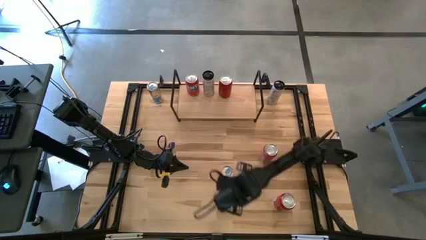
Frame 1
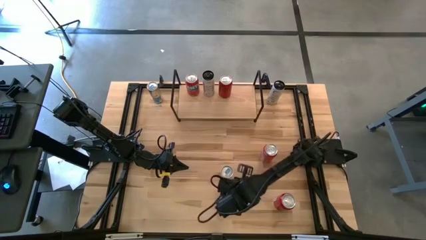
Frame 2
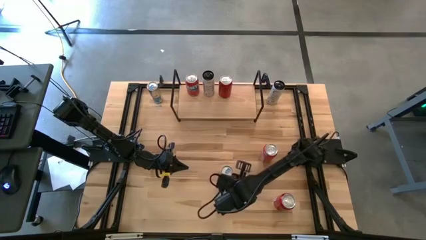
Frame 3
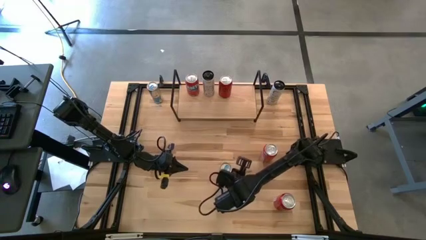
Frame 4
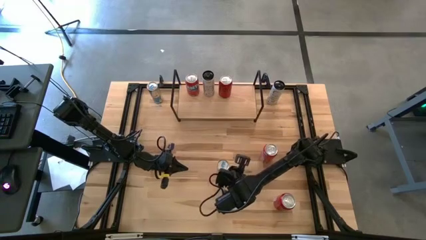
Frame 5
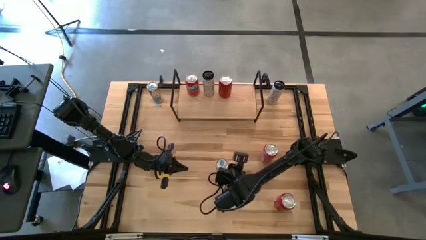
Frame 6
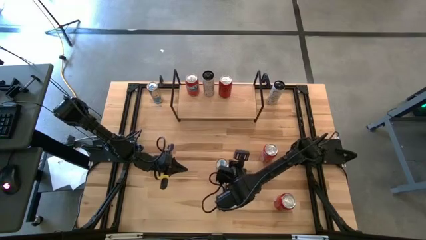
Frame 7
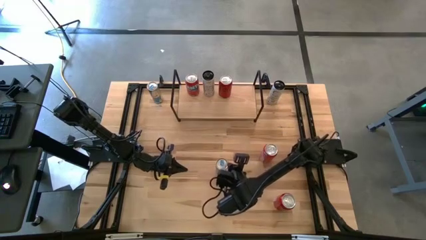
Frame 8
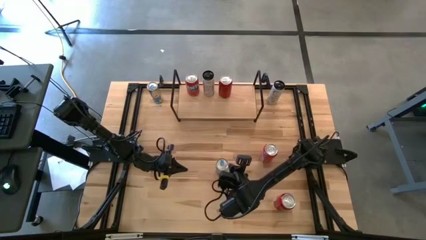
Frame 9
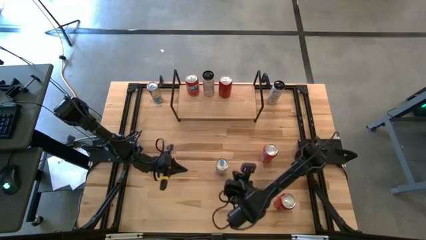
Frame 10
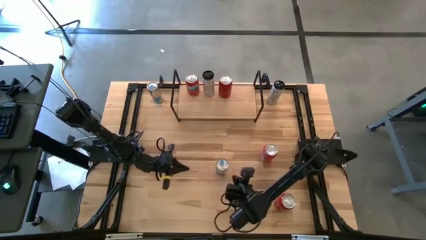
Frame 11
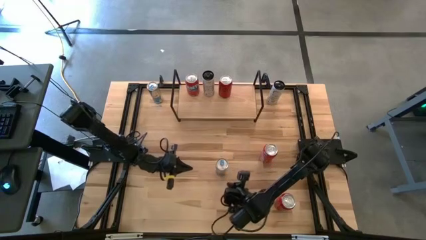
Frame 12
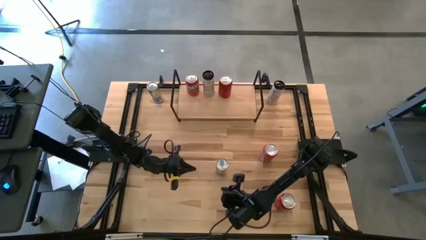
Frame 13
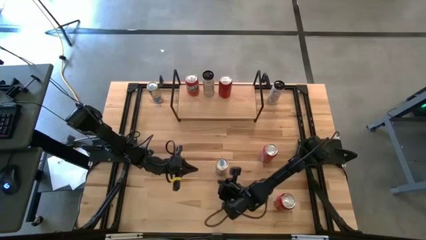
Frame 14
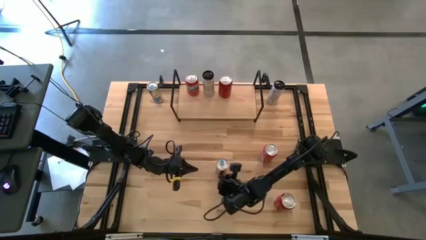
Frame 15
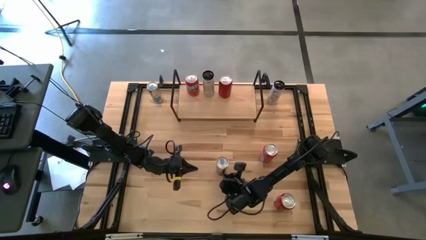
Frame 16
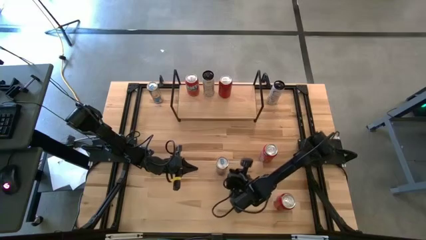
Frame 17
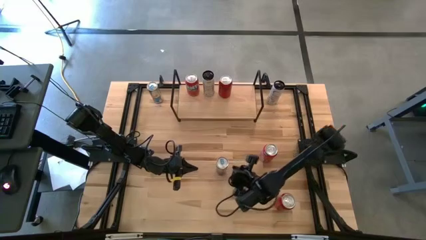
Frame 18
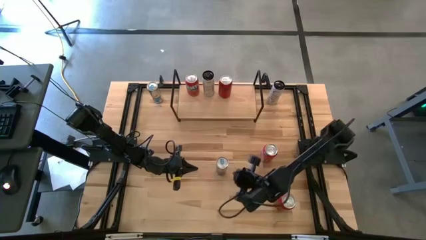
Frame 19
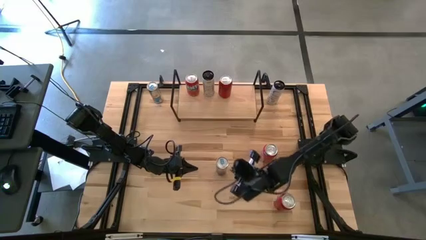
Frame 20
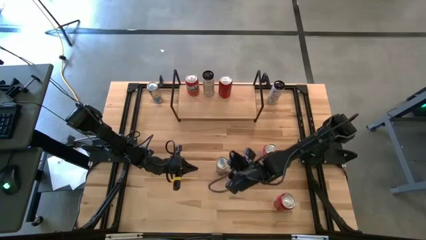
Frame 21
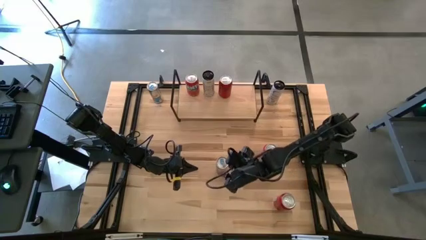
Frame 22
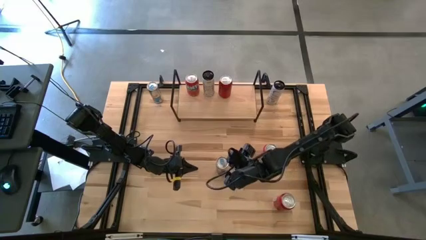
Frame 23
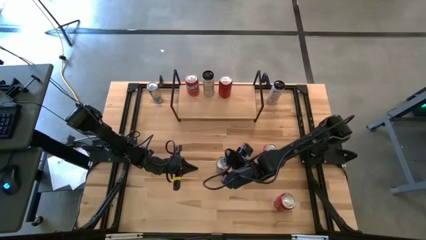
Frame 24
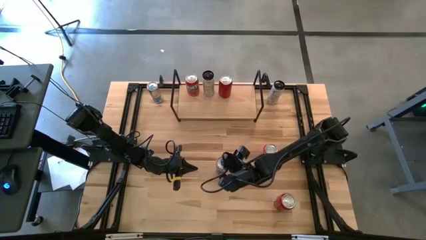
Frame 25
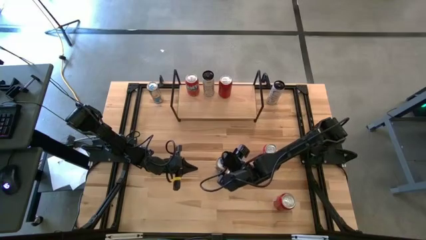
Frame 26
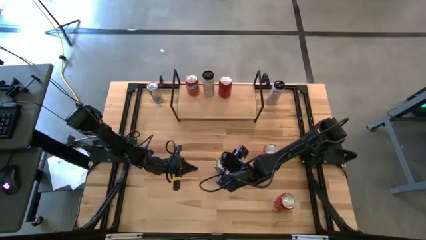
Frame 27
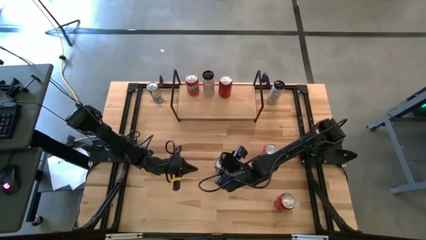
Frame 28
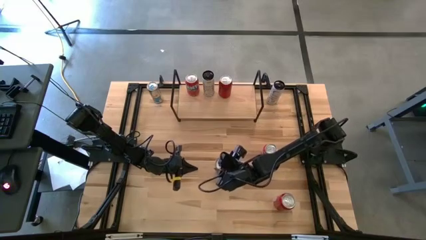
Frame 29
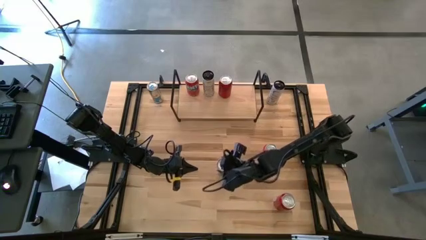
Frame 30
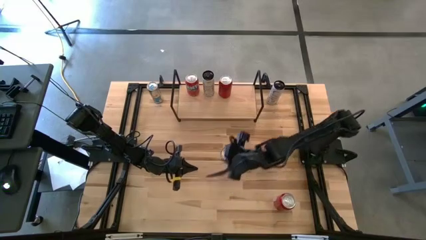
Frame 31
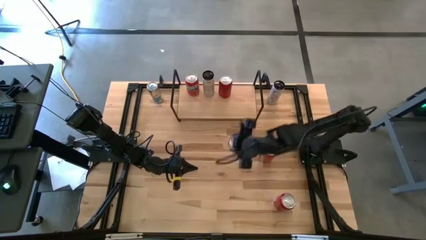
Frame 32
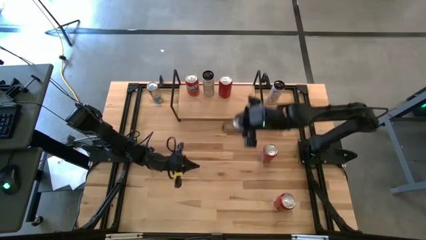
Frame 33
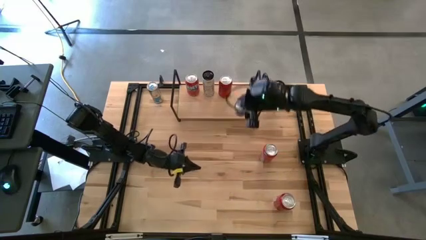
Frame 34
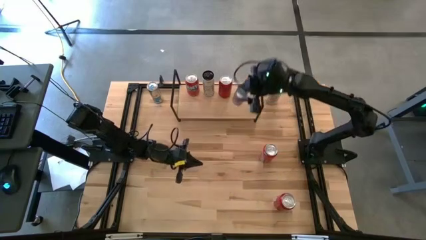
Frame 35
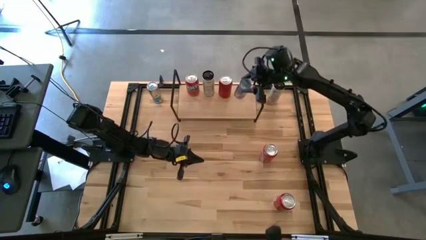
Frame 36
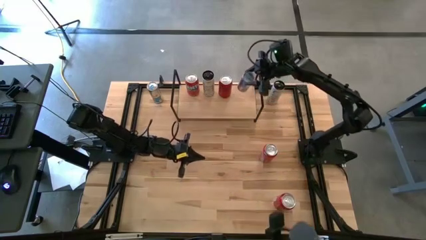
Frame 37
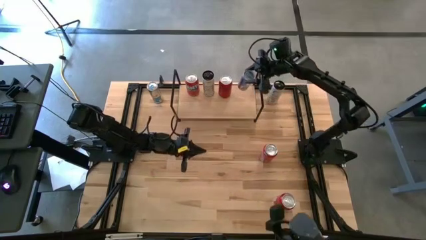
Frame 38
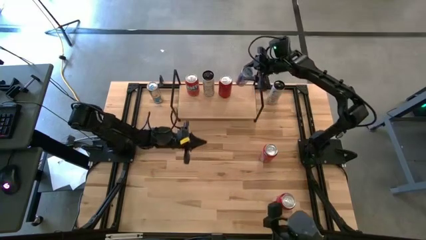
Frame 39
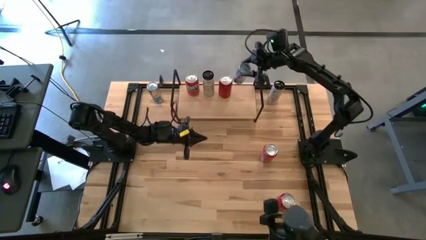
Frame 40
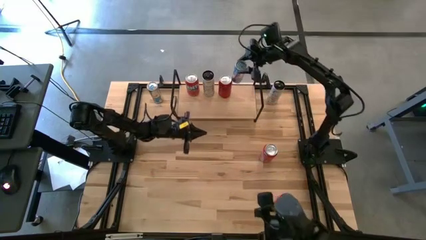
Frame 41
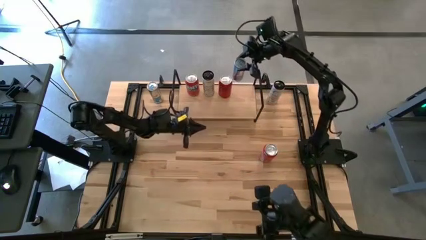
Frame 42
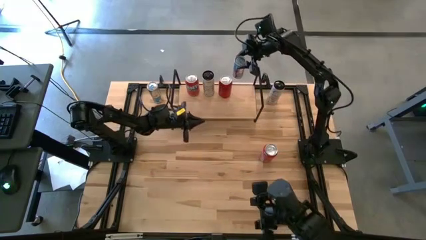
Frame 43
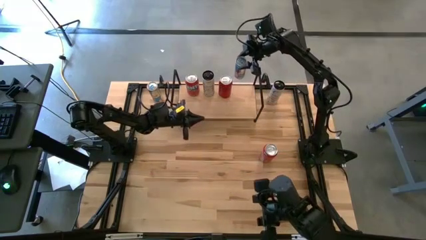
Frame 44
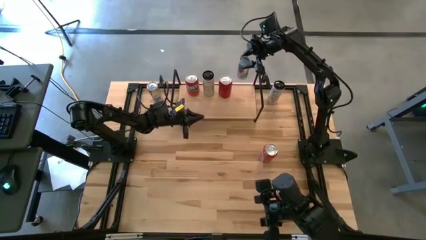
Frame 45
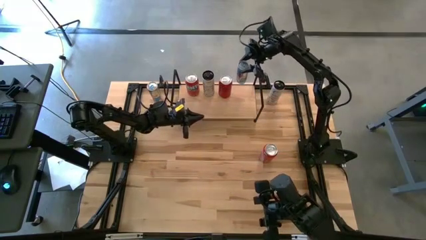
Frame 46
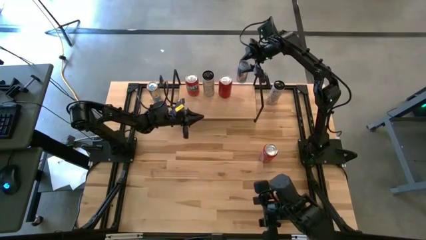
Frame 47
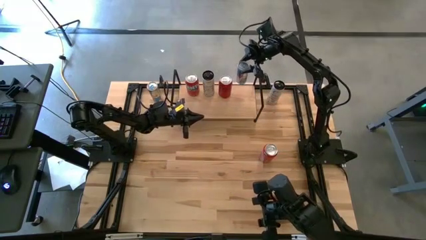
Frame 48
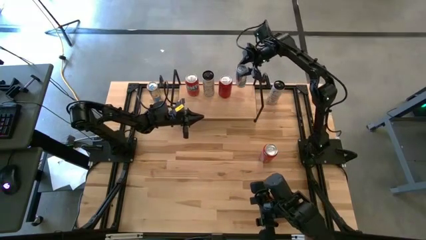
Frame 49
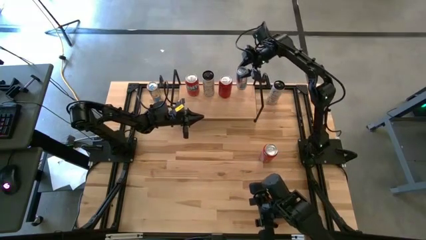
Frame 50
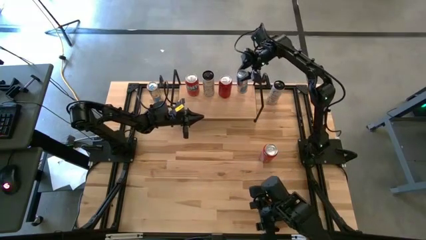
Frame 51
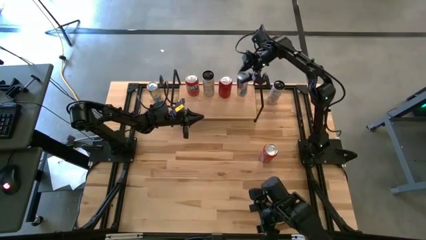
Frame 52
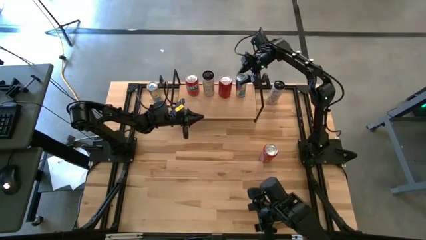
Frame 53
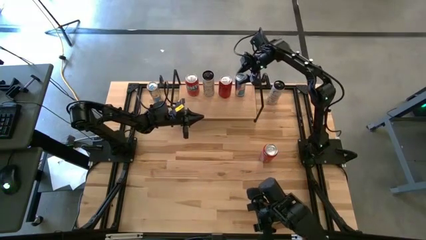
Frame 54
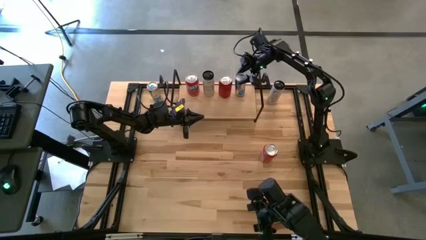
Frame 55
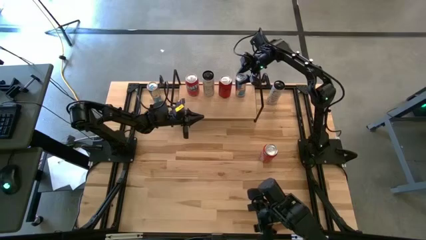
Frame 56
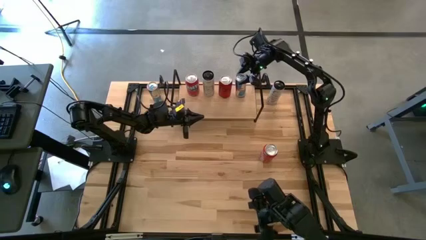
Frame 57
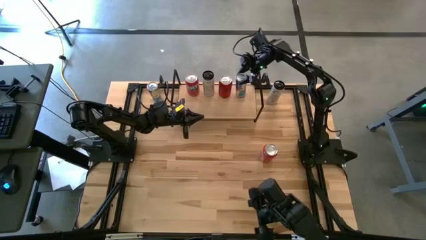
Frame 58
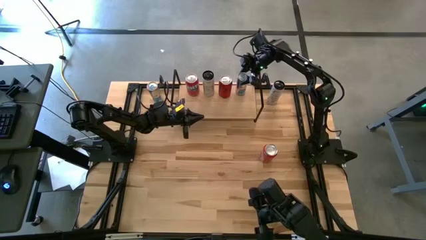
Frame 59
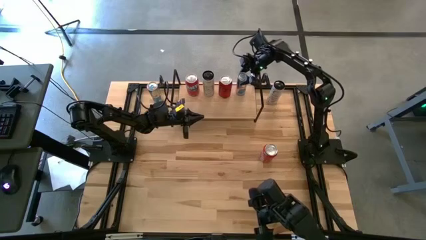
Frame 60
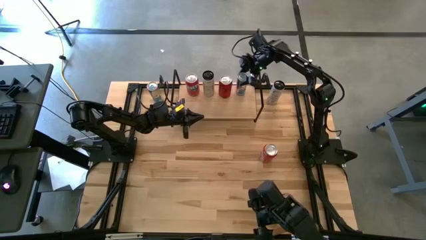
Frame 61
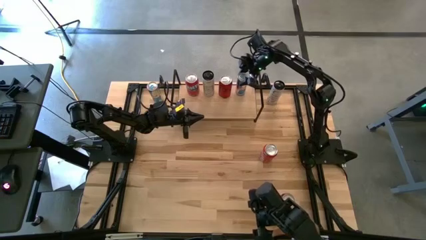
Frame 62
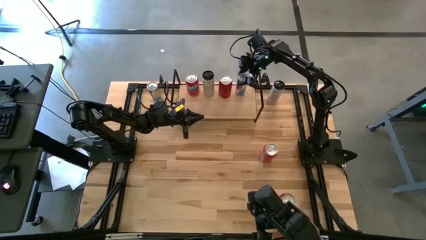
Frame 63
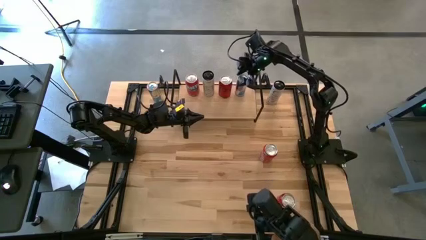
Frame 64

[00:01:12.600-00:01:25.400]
Task: Place canned beverage on shelf
Put the bottom blue soda can on the shelf
